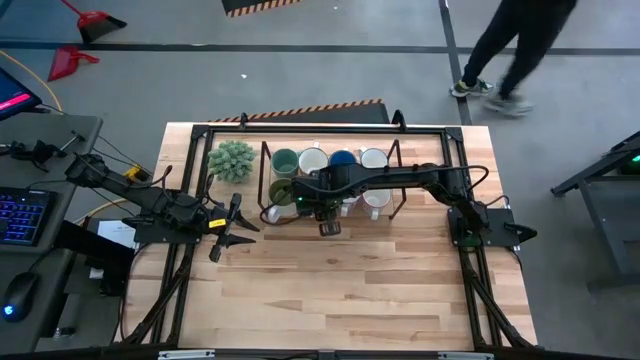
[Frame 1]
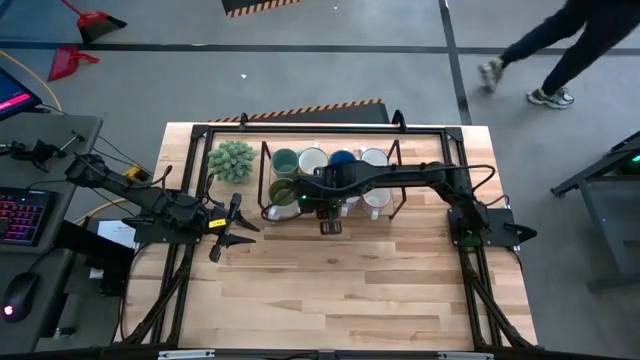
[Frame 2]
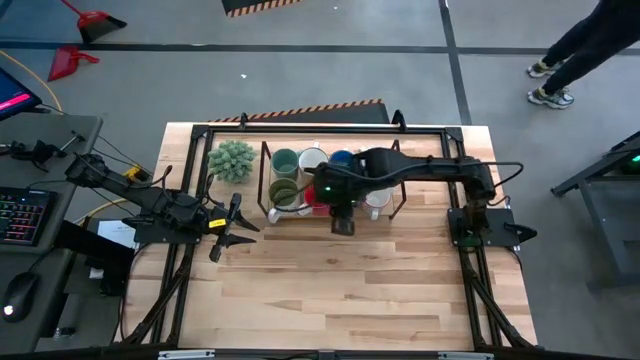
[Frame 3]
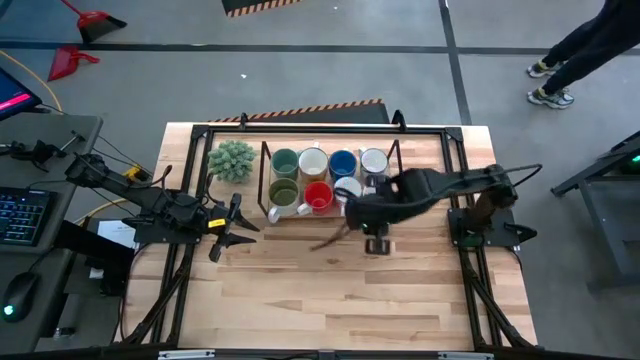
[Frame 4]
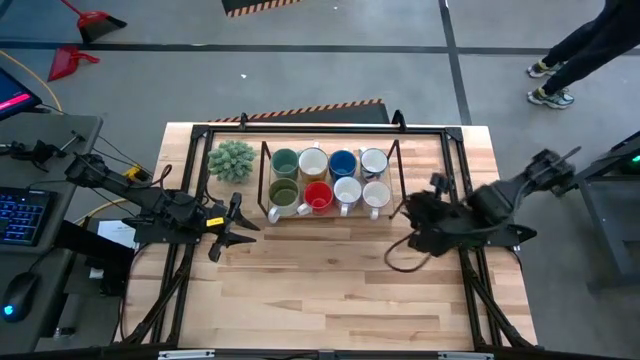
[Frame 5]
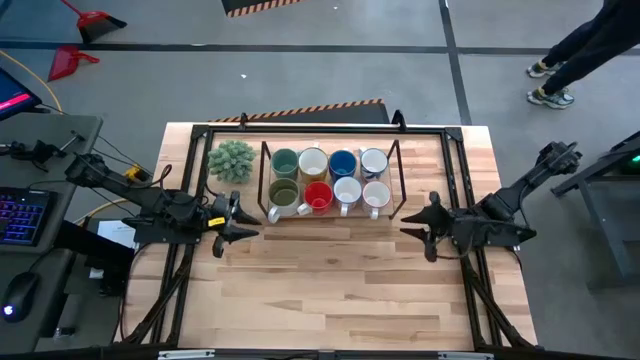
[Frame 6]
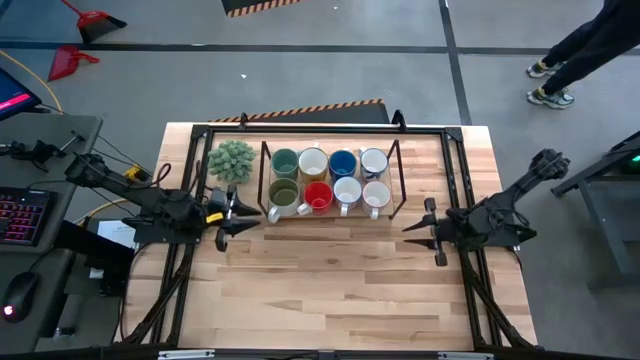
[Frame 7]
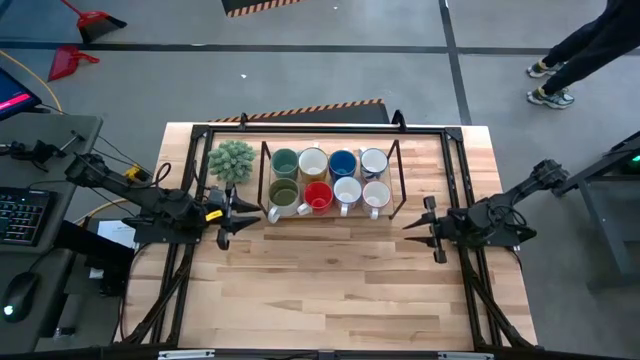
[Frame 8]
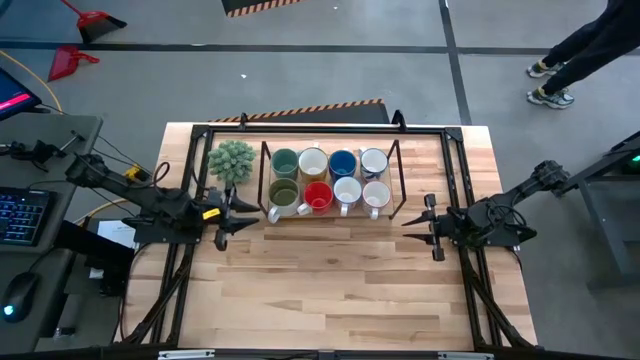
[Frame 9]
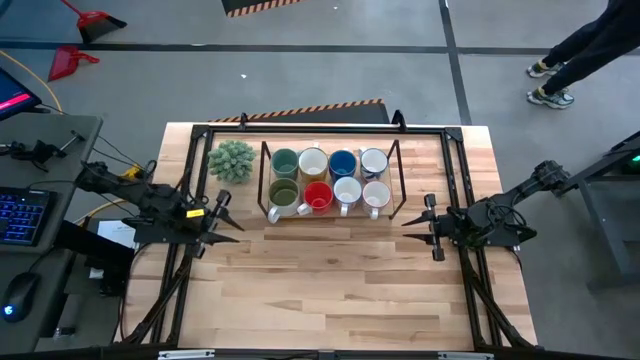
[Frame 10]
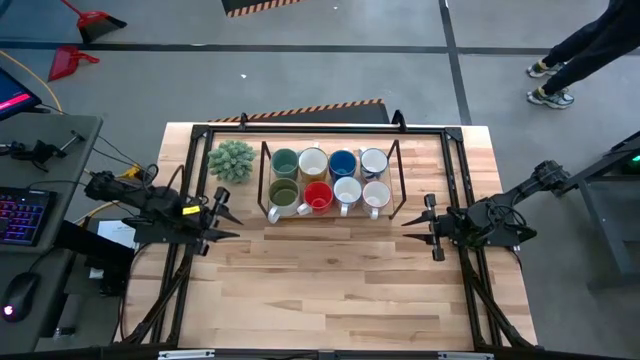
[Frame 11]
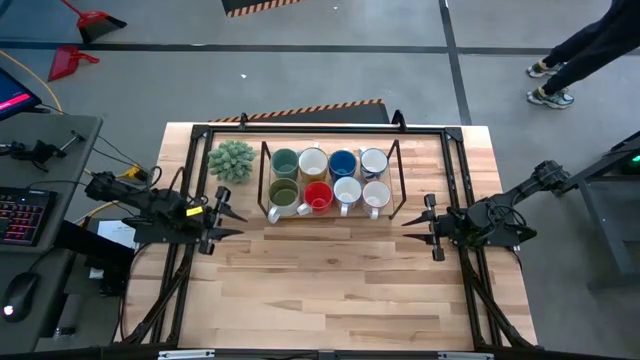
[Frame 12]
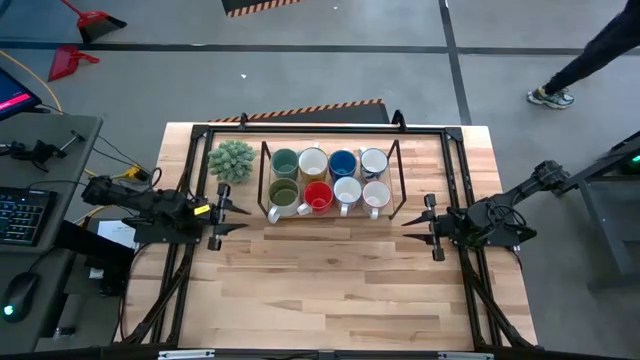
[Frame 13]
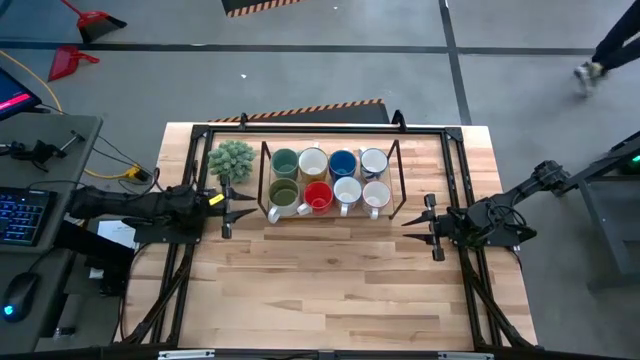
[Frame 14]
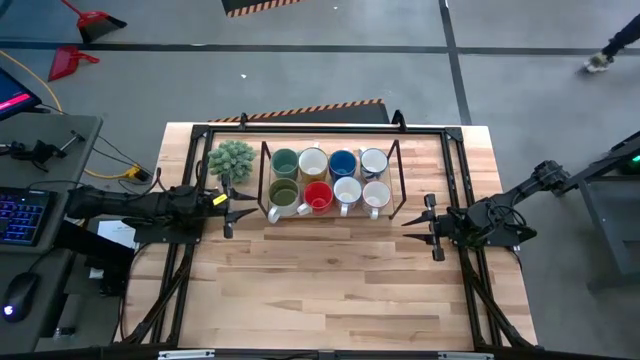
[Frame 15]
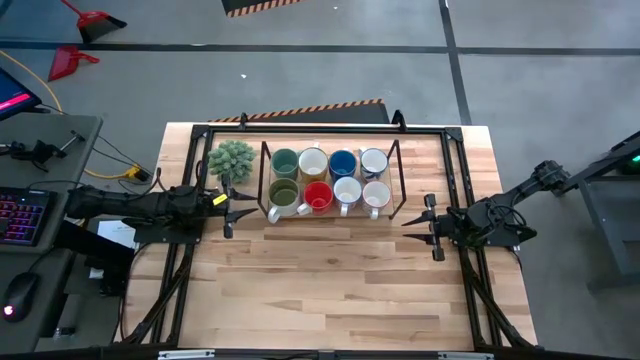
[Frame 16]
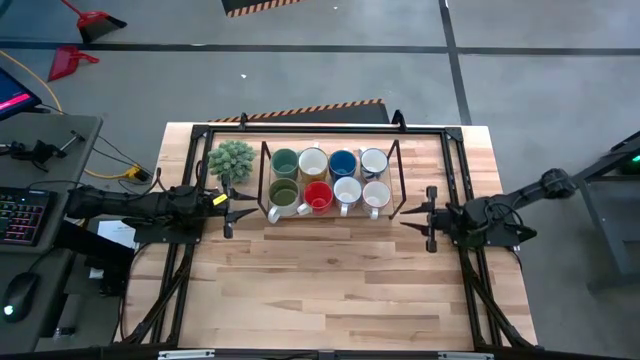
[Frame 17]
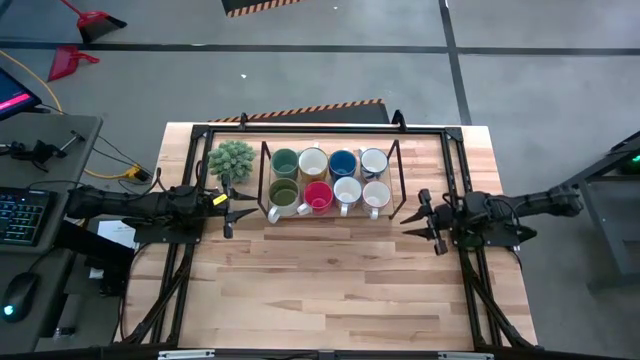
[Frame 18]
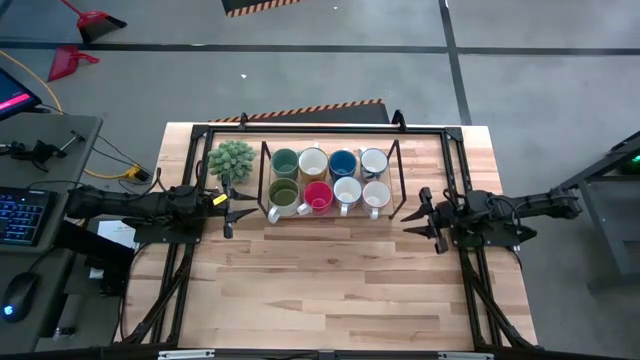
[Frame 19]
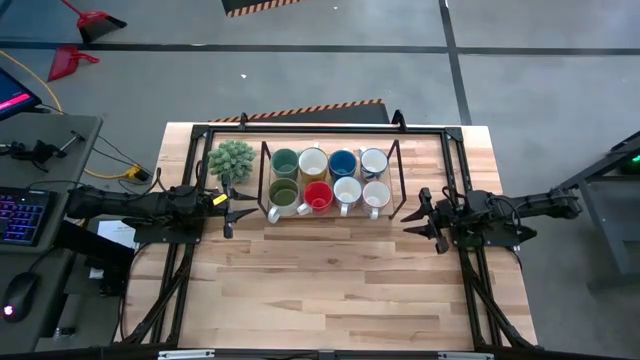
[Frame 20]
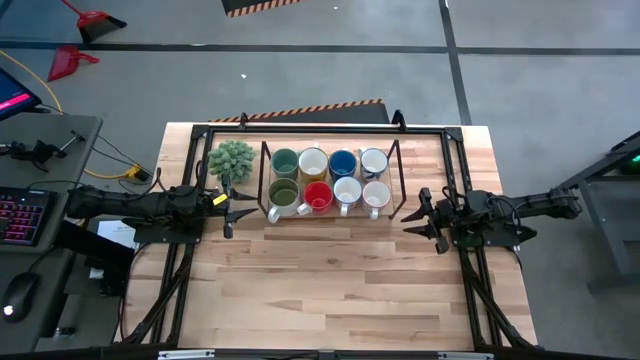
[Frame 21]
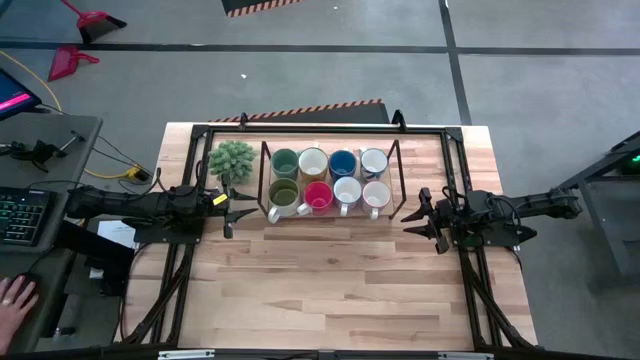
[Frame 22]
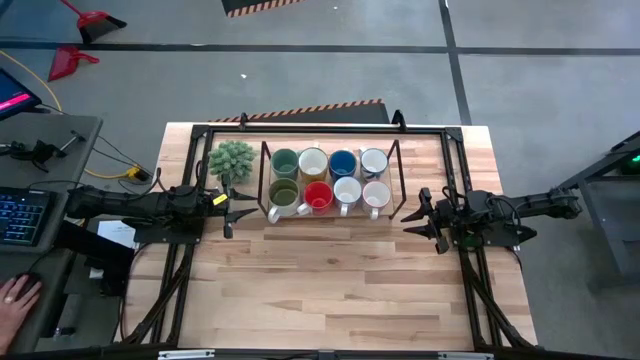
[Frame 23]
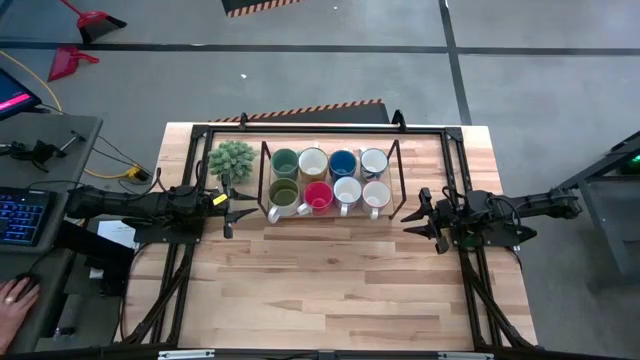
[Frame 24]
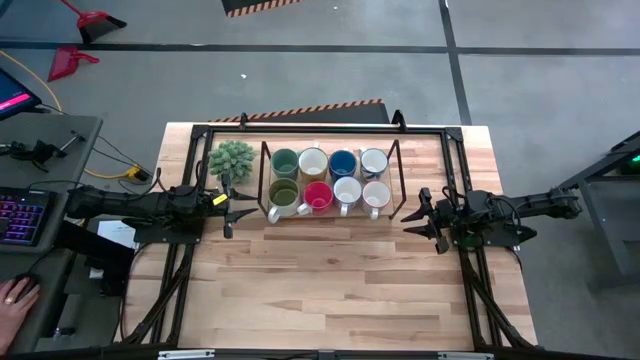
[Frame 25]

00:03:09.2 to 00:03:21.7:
Task: Place coffee mugs
Return to Home Position
